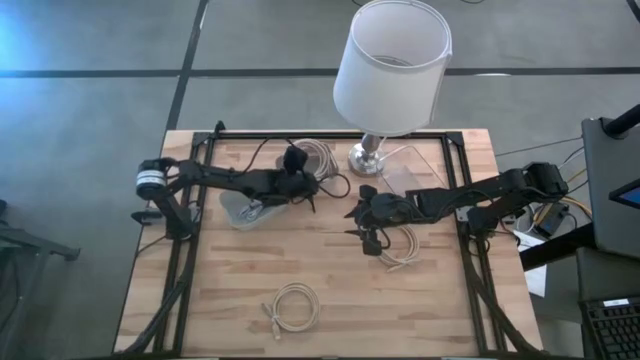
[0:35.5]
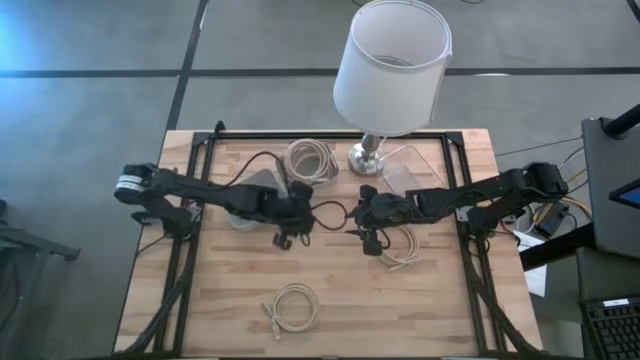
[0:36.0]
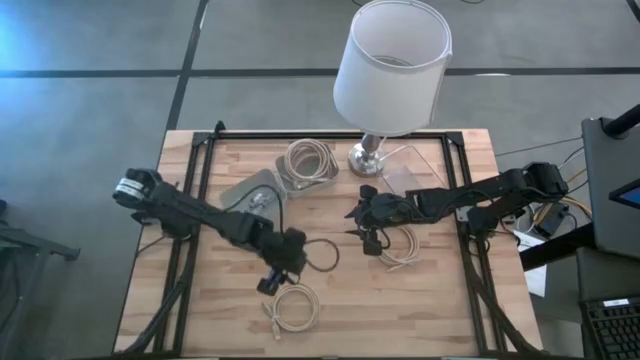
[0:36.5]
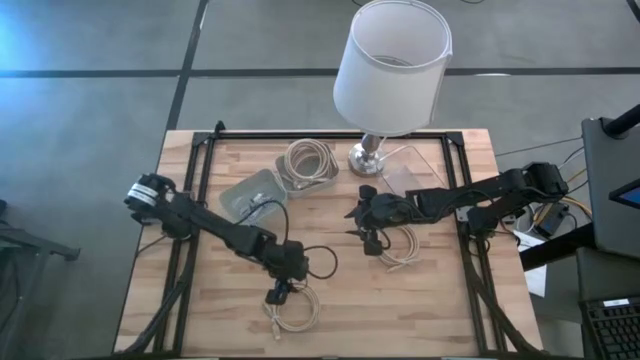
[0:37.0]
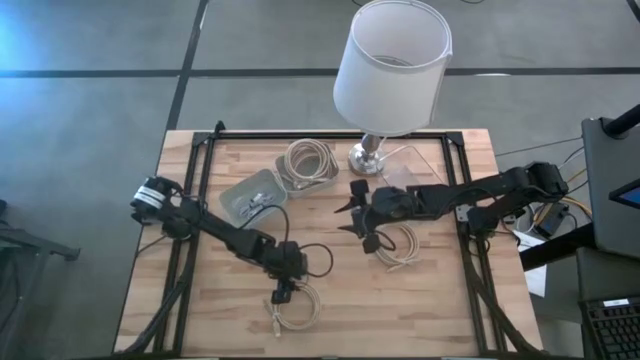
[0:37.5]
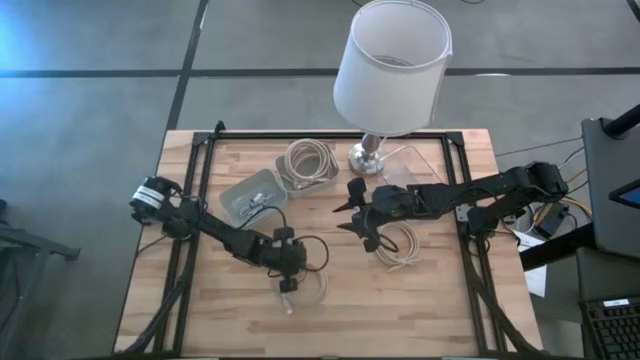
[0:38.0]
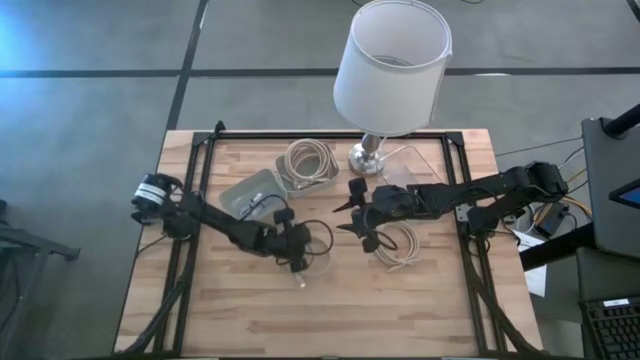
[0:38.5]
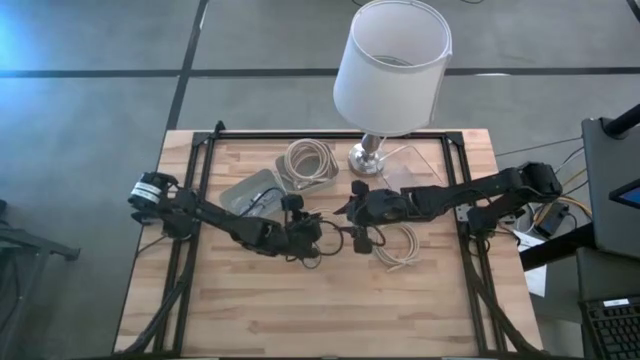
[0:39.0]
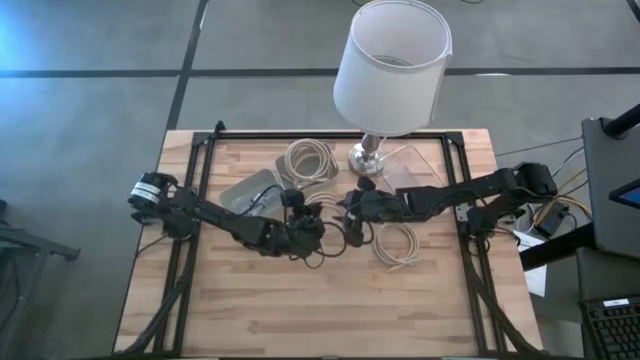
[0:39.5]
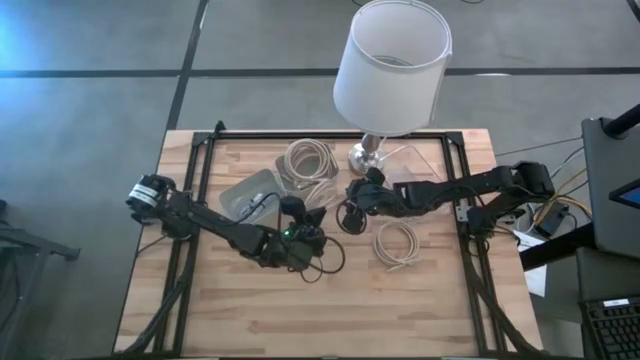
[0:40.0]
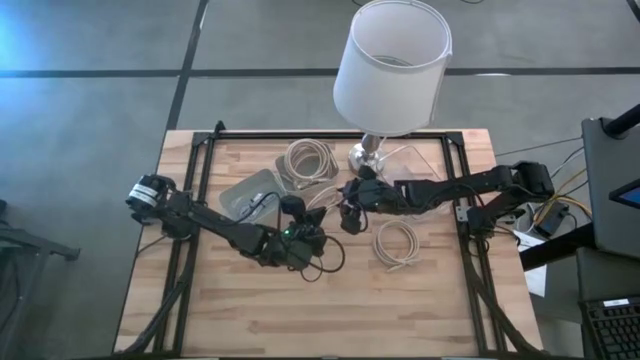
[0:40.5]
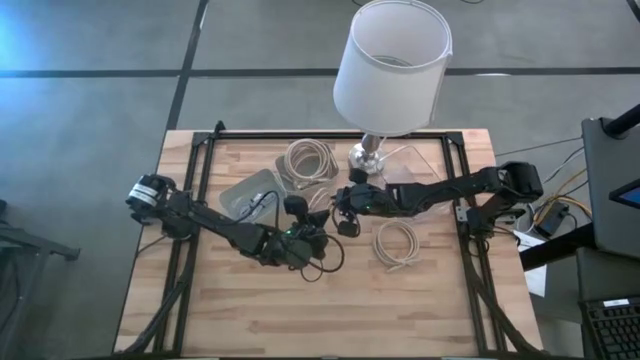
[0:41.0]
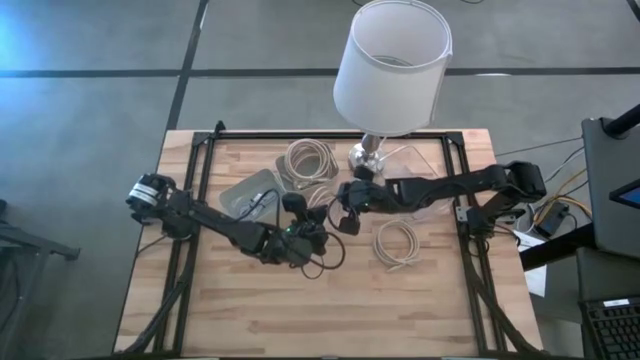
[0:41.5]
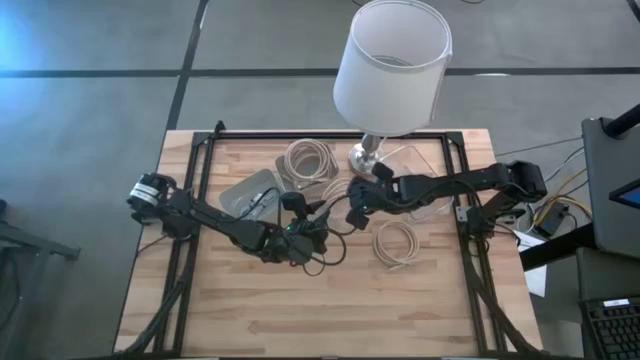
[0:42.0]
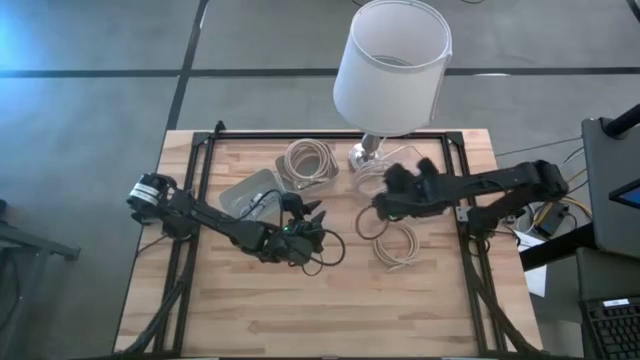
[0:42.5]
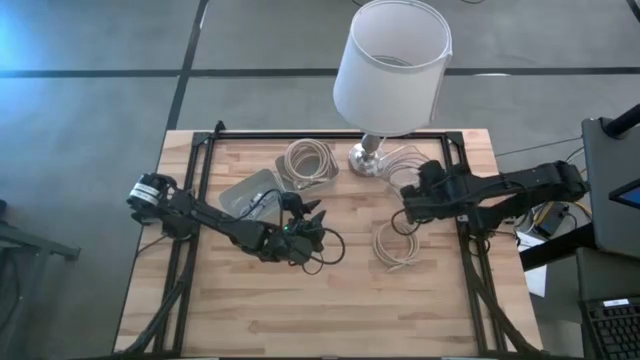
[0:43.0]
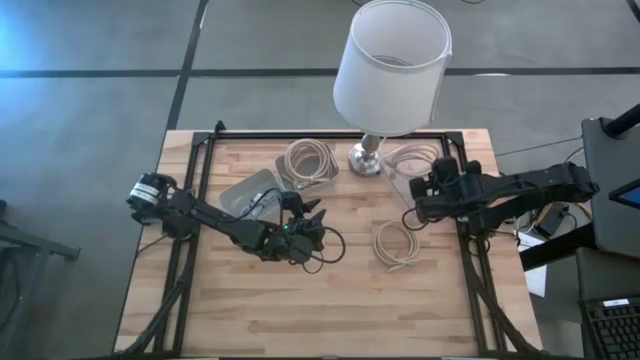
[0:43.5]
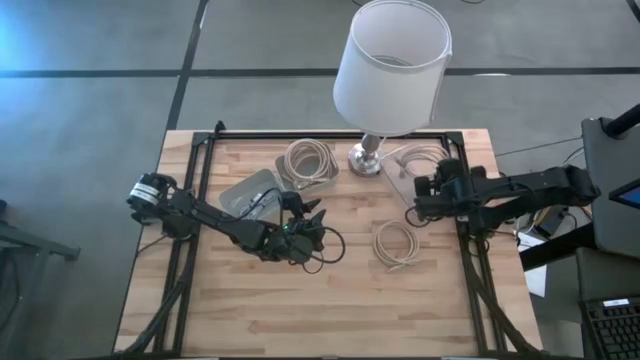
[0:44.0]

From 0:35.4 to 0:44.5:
Task: Pick & Place USB Port
Put the light brown USB cable into the transparent bin

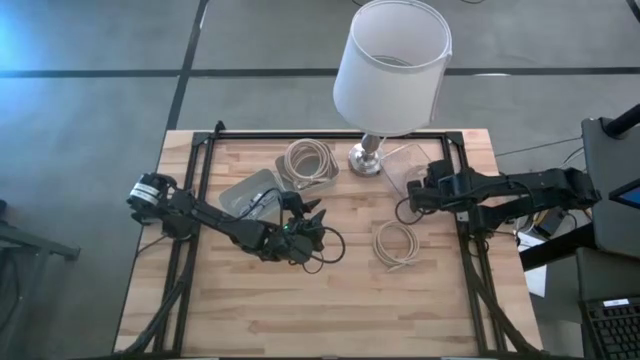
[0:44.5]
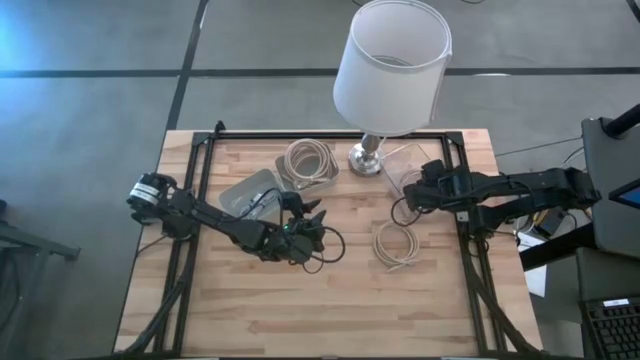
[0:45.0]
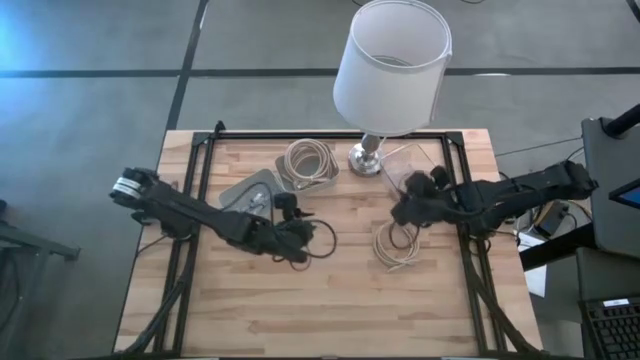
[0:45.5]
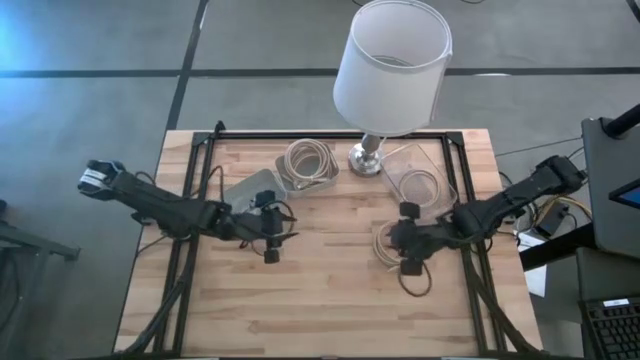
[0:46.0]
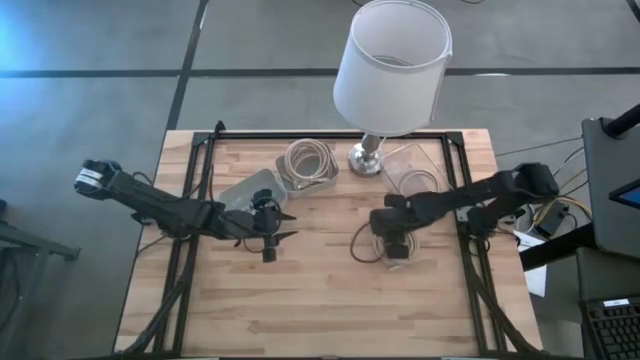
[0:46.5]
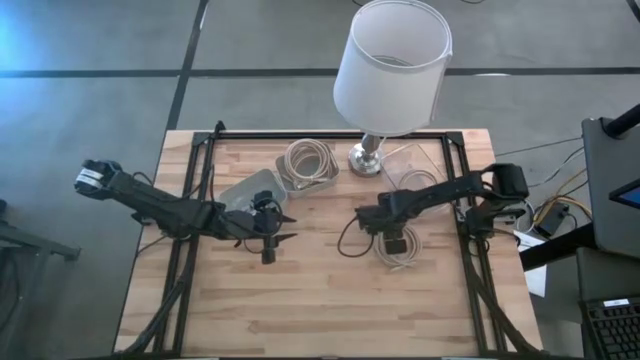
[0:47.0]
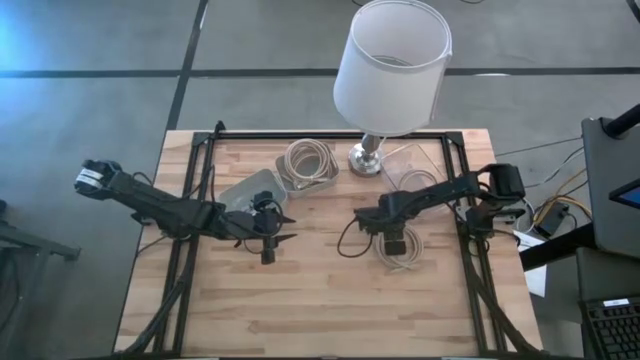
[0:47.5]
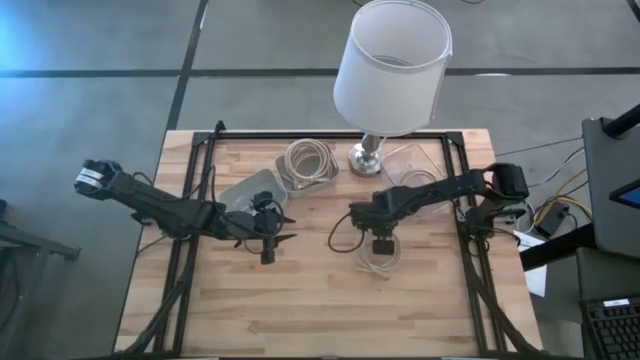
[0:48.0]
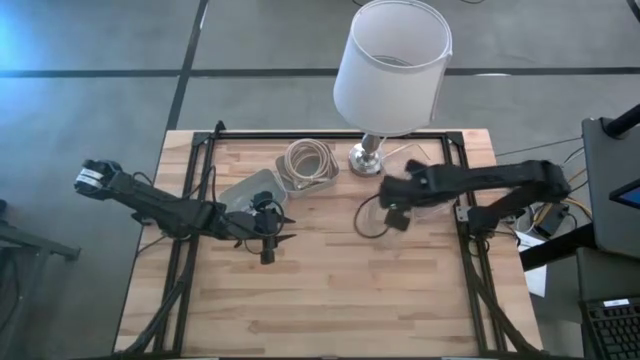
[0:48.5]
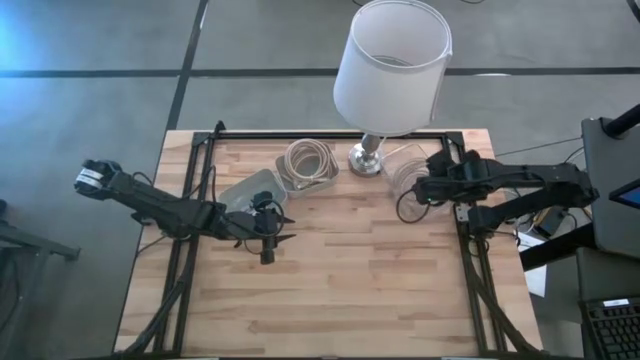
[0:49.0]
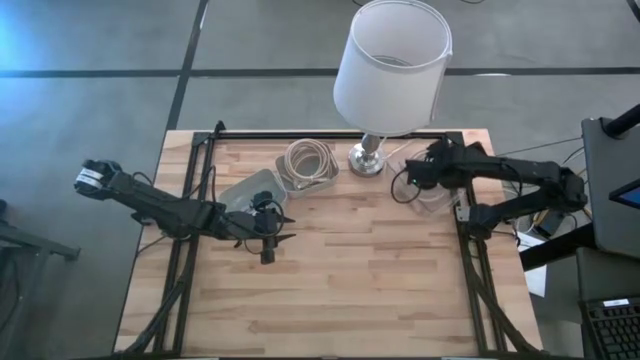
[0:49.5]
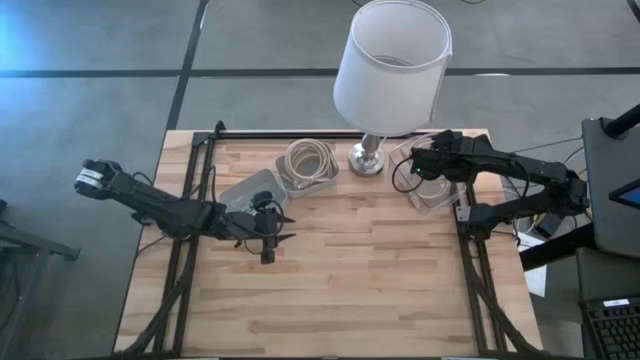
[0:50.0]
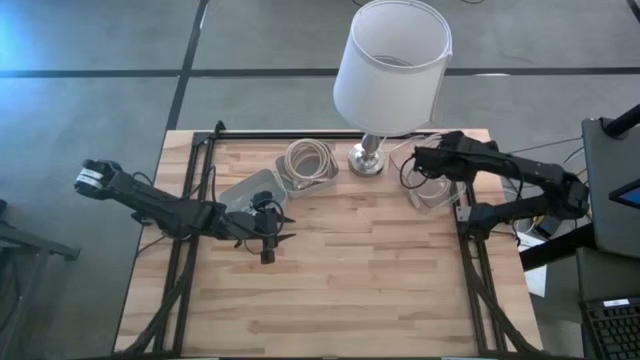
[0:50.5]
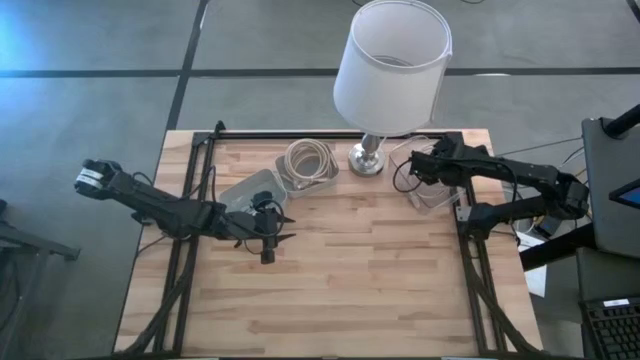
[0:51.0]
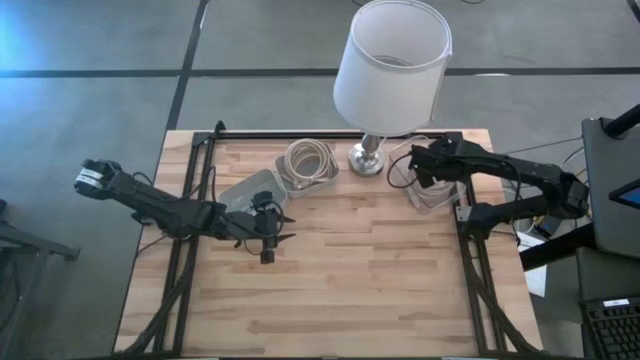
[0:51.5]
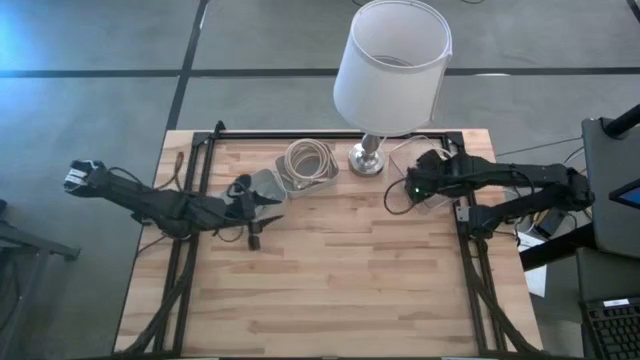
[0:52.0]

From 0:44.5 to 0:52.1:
Put the light brown USB cable into the transparent bin

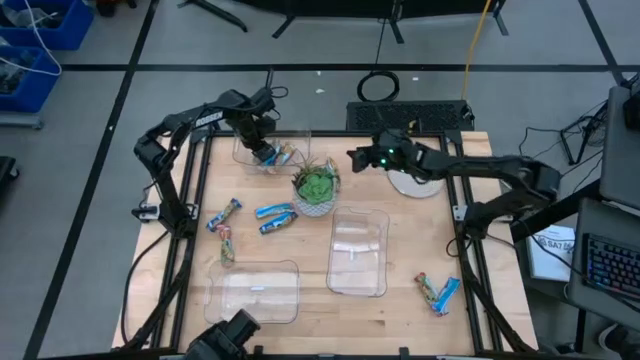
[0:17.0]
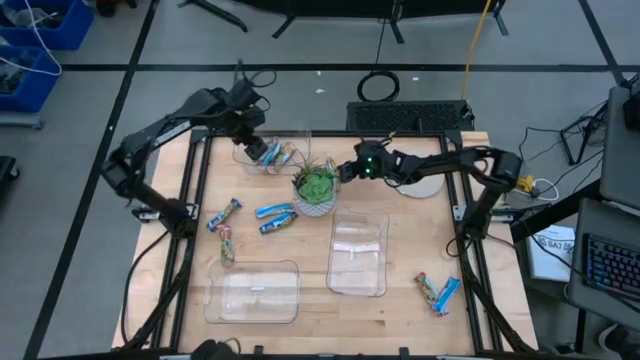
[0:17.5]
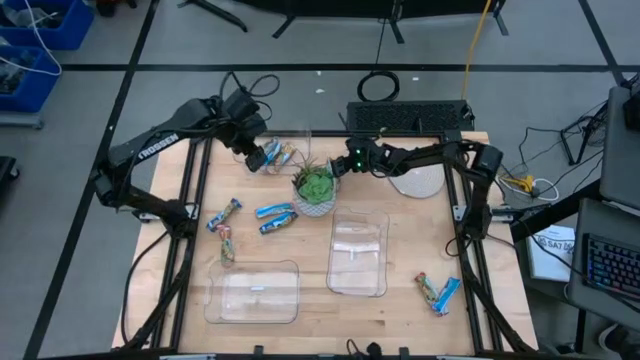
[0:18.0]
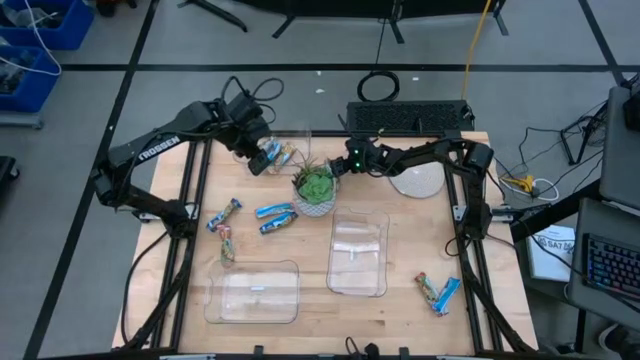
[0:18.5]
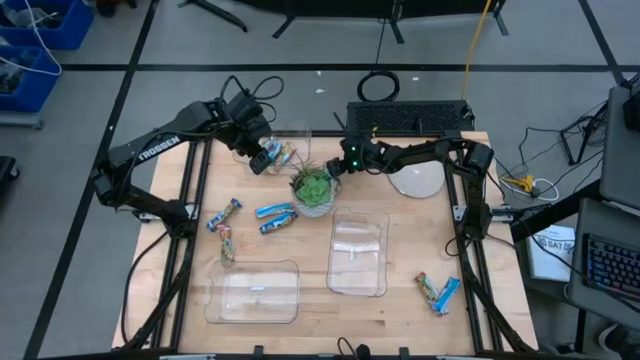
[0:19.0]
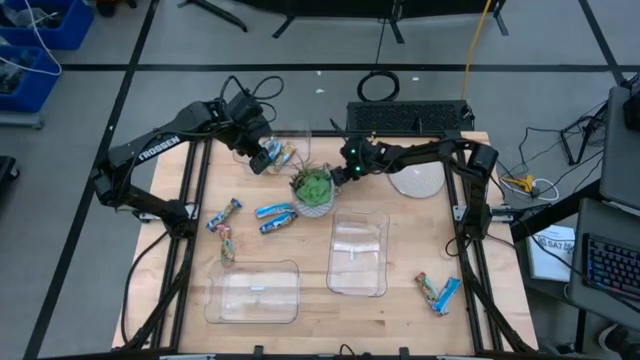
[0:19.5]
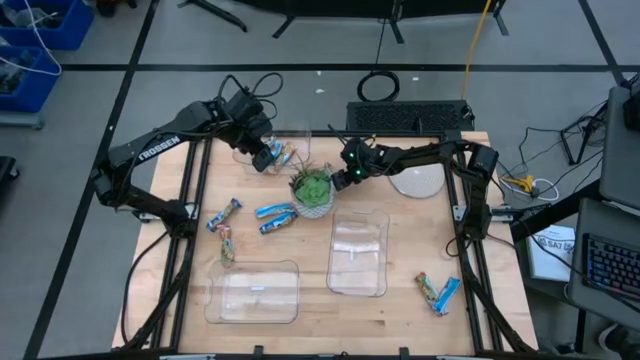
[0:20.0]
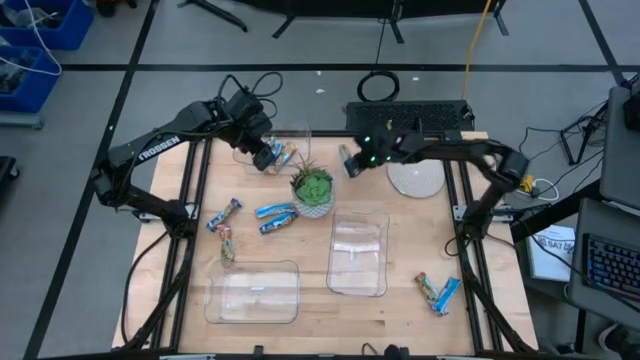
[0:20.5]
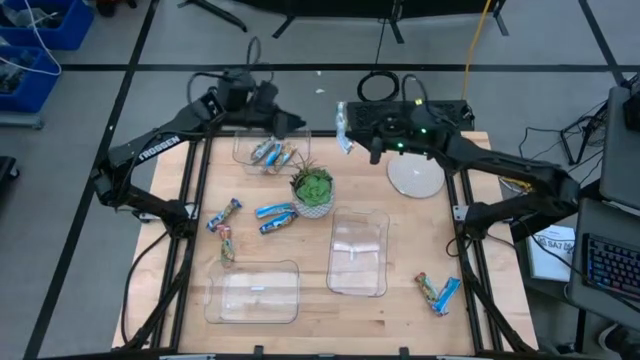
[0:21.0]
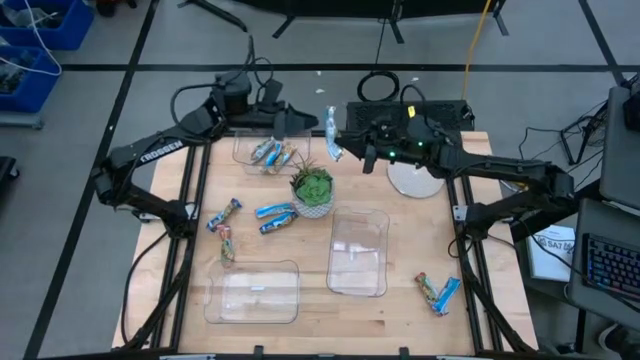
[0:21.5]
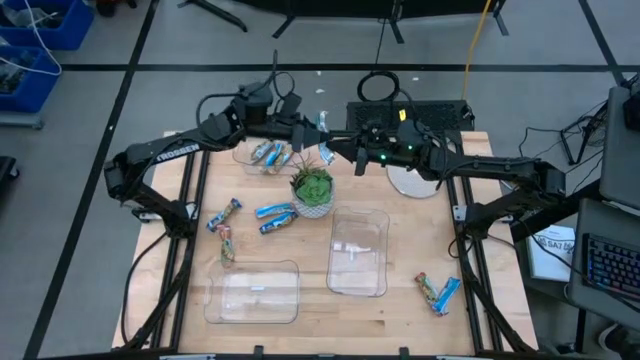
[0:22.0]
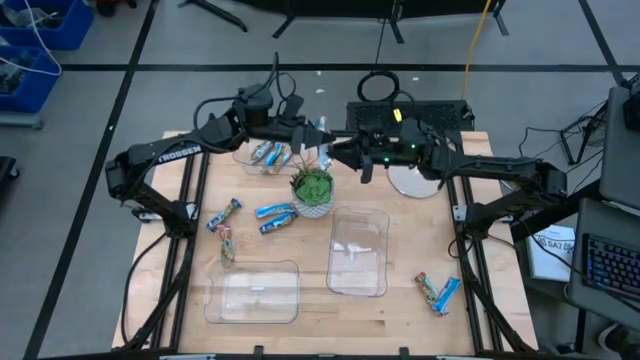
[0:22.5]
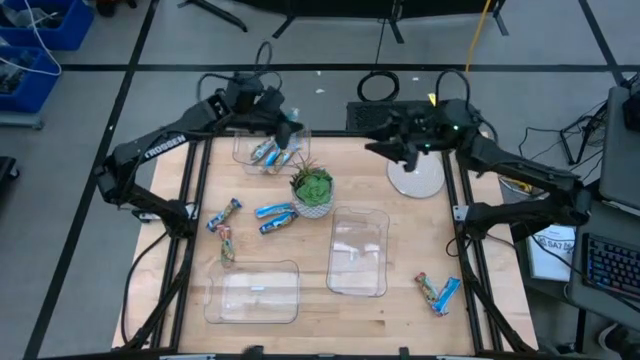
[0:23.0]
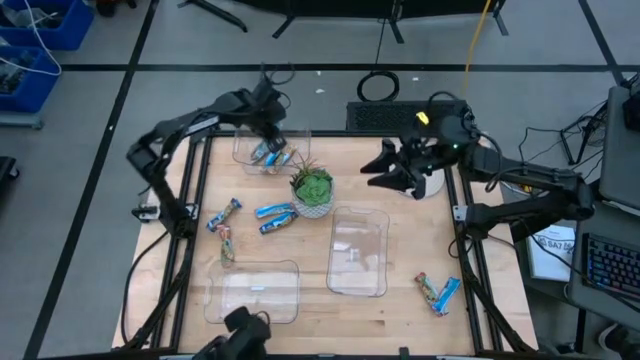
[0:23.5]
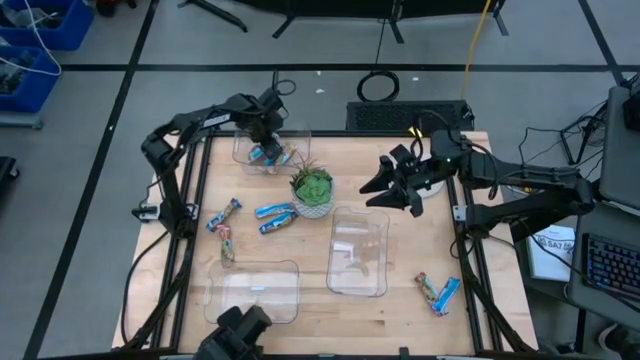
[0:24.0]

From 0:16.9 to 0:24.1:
Task: Pick and place Granola Bars by type
Put the yellow granola bar into the top transparent bin
